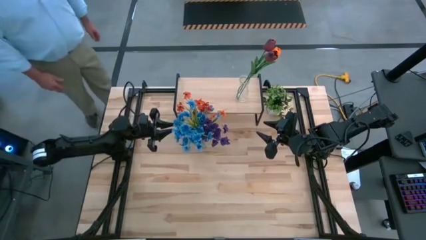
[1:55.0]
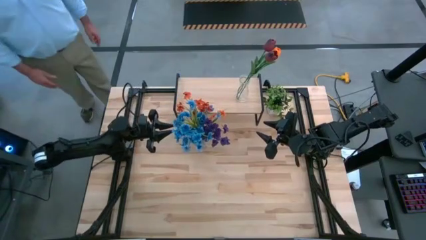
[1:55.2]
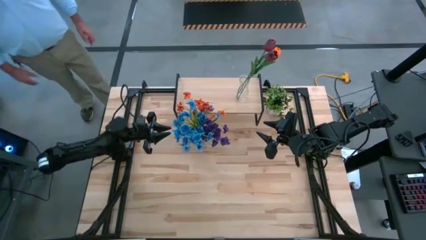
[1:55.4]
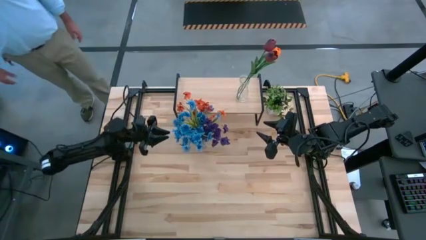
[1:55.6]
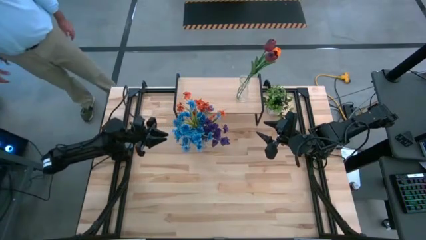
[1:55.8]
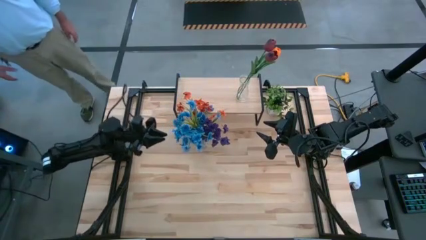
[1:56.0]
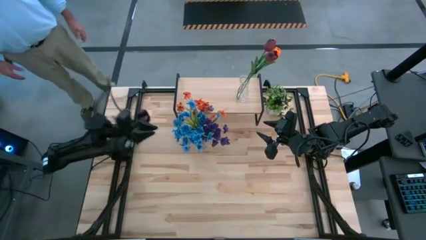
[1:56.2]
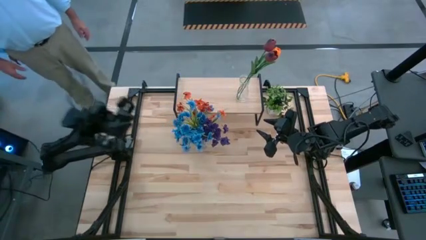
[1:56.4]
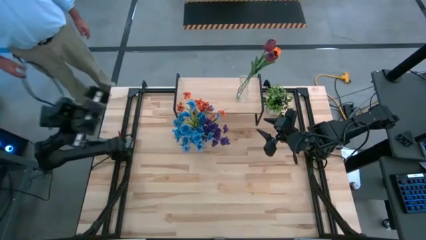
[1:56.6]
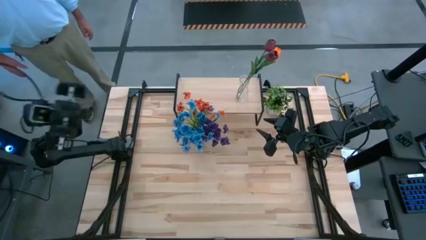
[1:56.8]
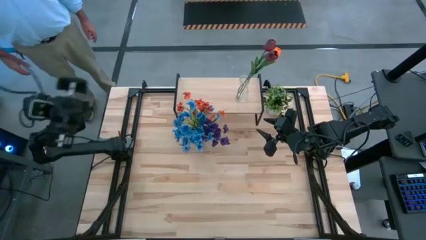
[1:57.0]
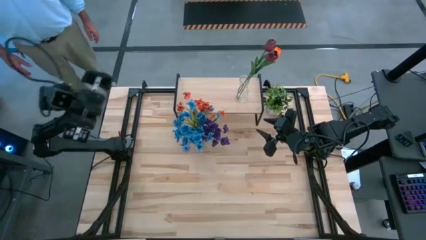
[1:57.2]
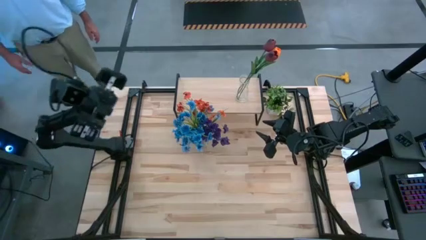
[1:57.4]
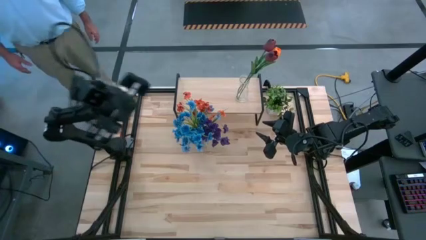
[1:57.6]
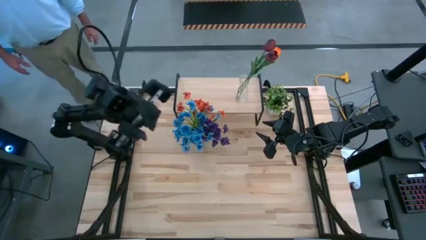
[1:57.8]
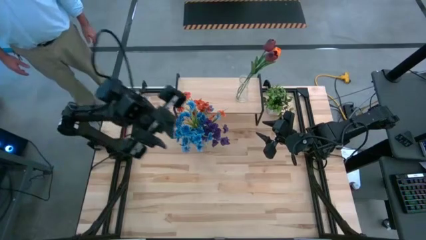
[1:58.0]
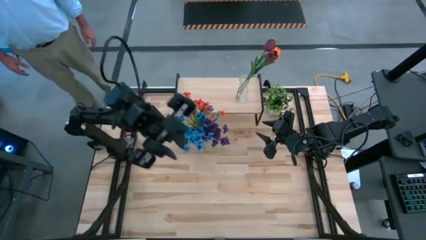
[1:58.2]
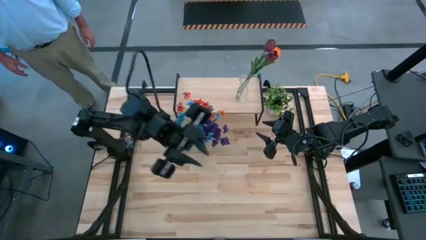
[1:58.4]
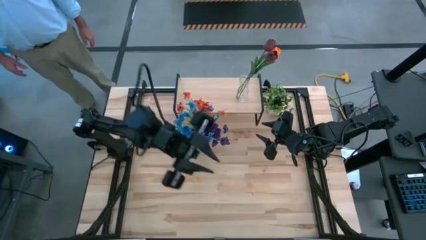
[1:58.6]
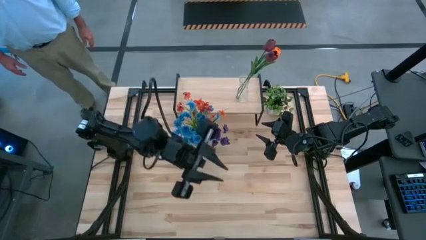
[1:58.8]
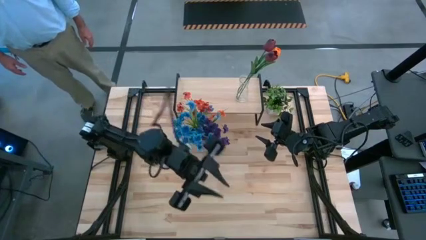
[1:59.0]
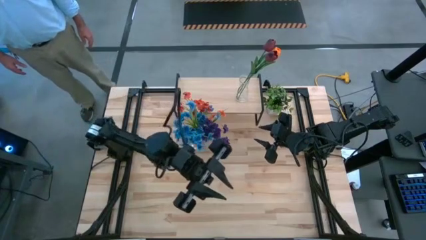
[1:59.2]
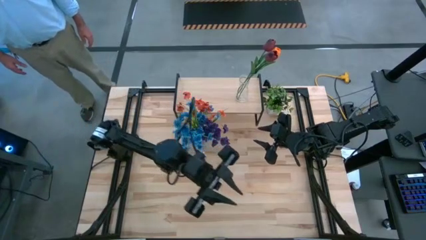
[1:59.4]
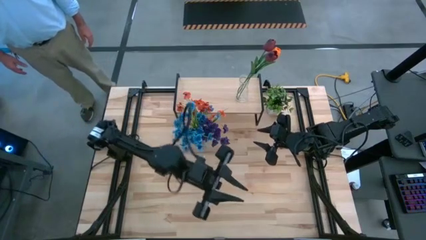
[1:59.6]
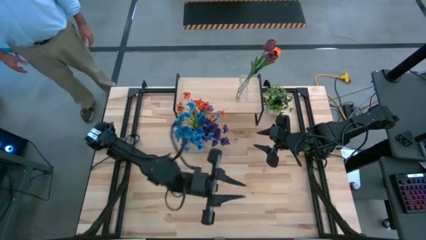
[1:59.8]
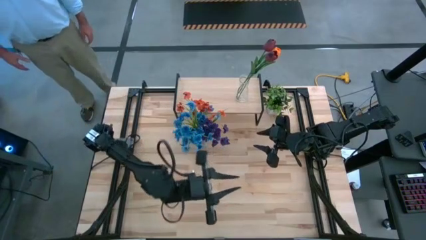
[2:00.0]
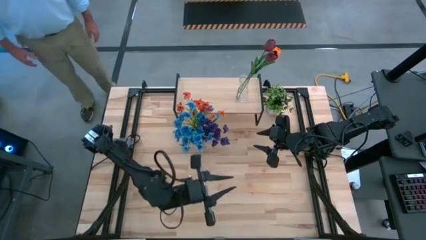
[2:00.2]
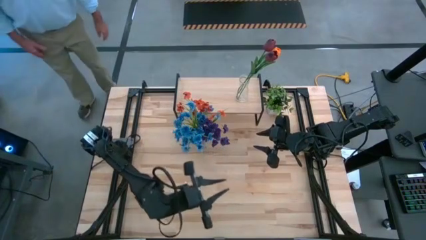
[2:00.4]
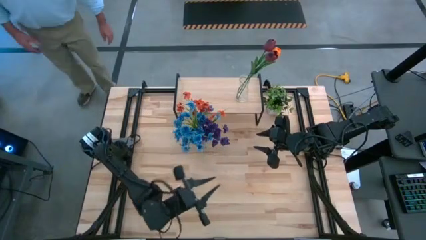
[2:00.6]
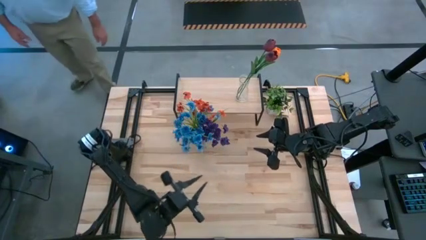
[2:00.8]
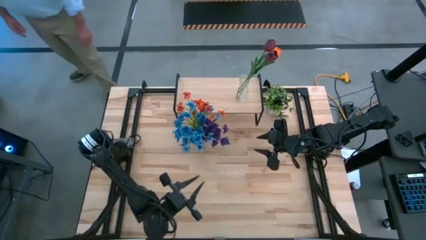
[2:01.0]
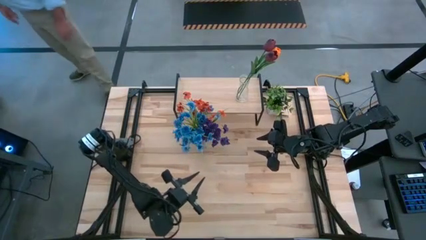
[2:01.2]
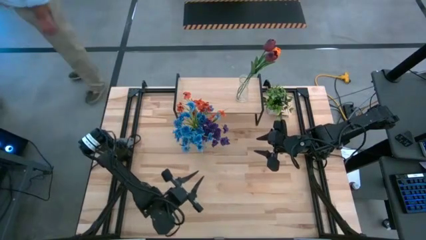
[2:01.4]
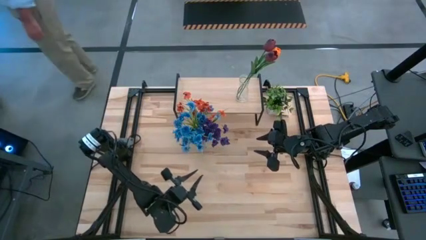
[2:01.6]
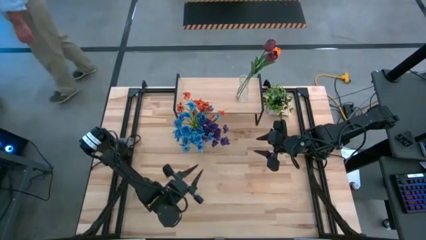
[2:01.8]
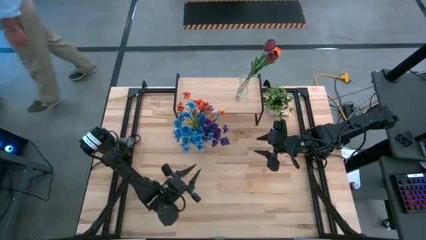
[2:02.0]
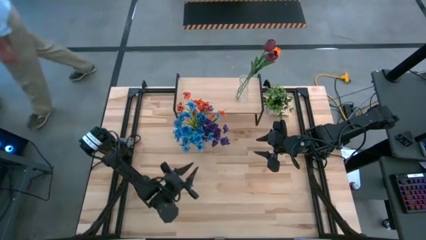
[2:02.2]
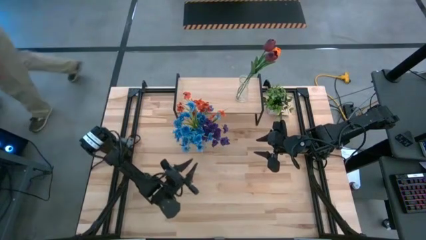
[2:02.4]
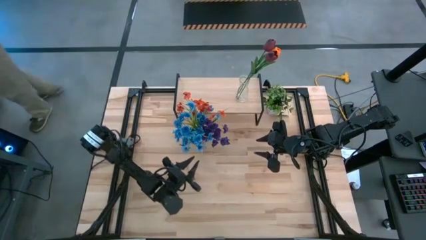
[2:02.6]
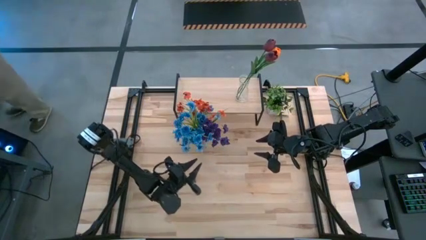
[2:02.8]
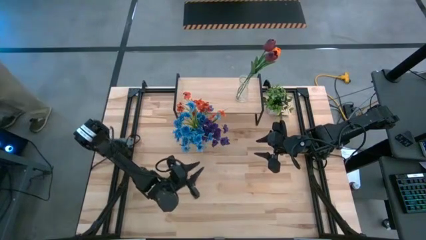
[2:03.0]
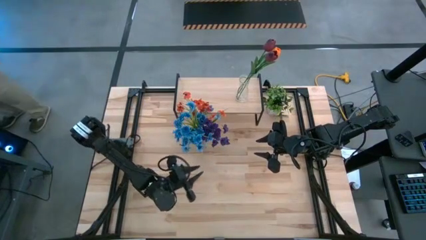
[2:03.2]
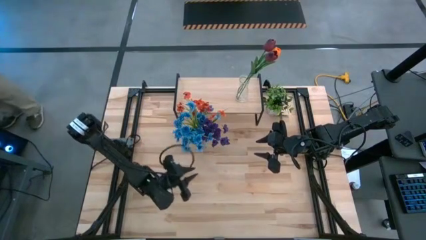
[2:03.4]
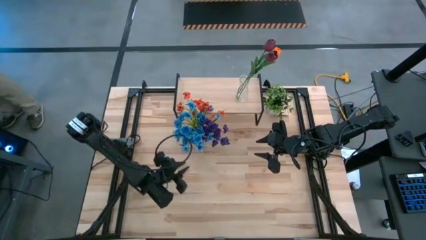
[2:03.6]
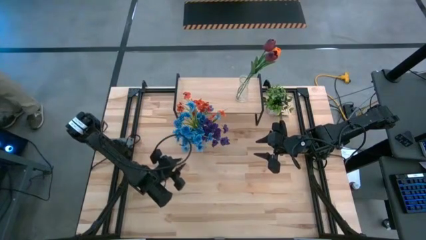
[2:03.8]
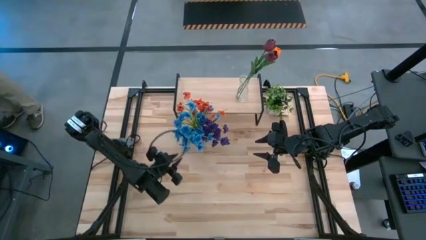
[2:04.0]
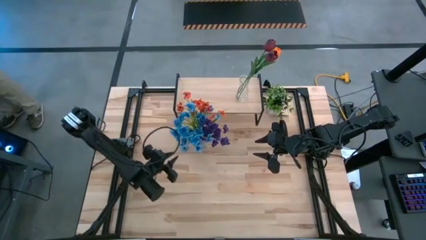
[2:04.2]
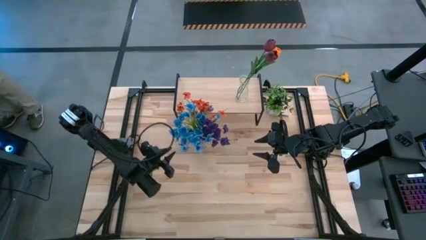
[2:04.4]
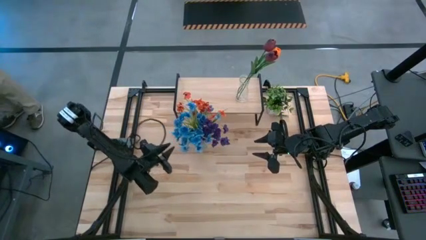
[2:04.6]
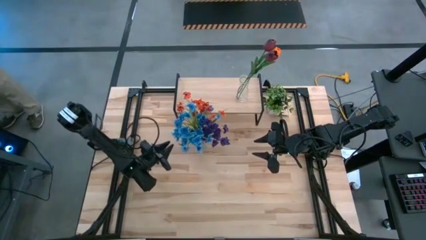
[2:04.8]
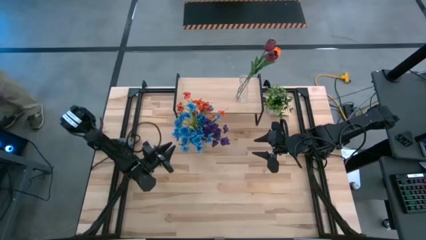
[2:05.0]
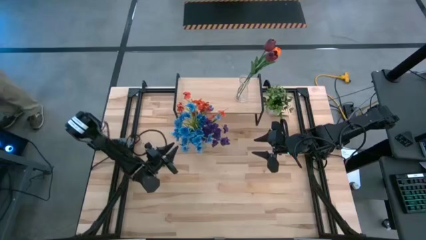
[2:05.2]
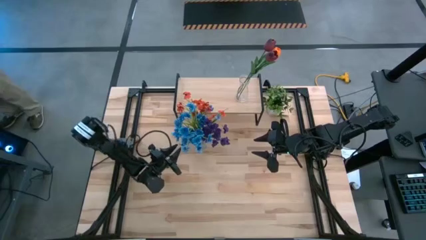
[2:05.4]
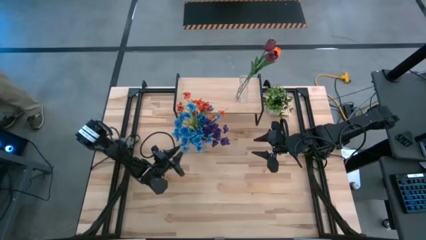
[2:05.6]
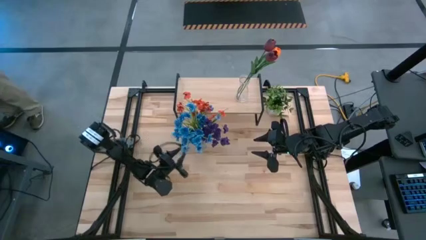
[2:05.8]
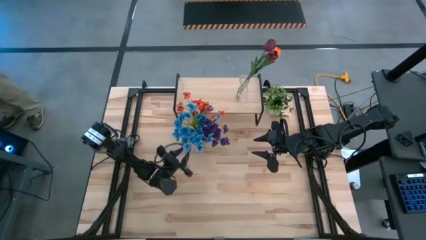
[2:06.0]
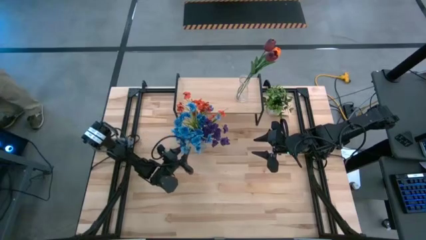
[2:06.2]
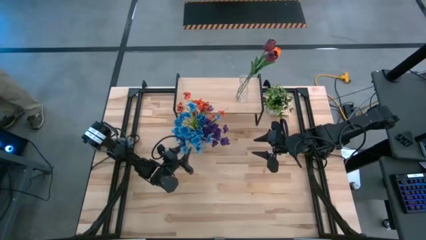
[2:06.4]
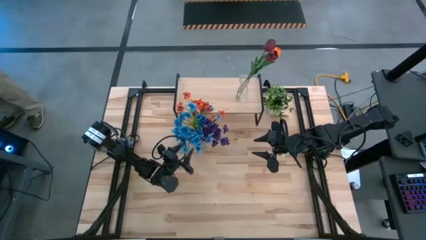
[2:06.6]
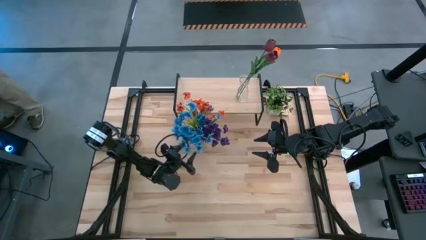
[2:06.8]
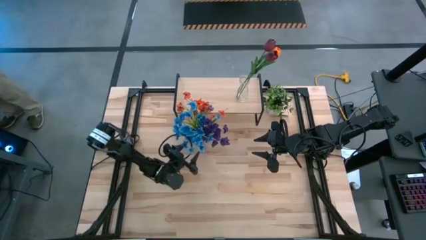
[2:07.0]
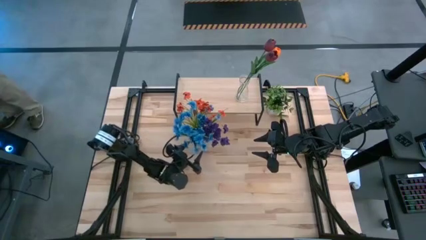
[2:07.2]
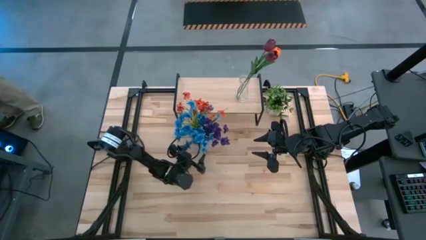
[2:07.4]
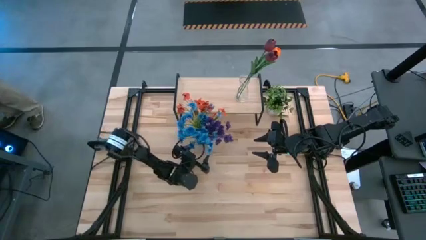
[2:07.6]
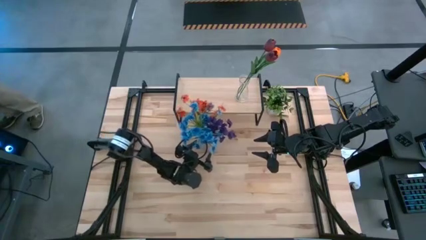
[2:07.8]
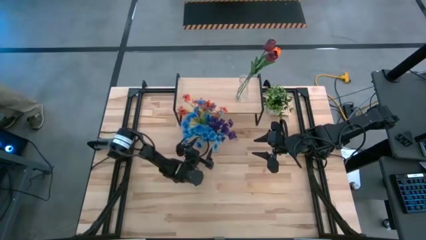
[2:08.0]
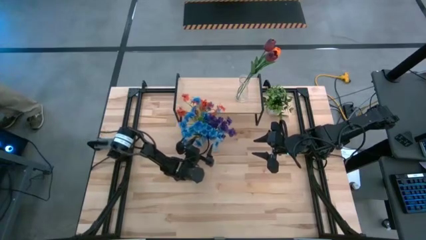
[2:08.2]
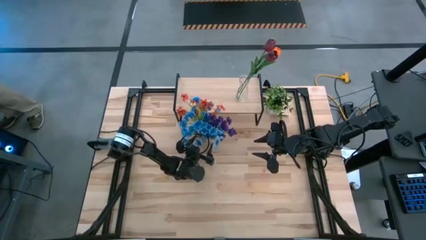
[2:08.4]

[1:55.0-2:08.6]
Task: Pick and place flowers into a vace then onto a shelf
Put the transparent vase with flowers on the shelf
